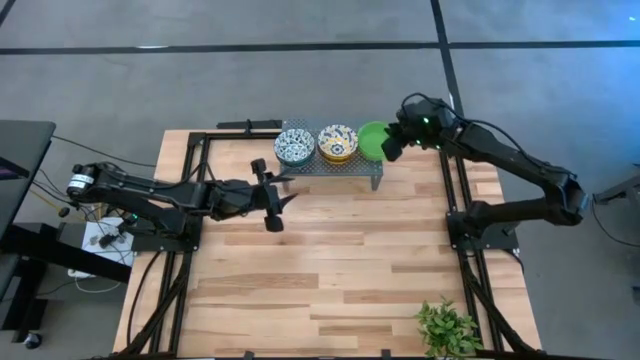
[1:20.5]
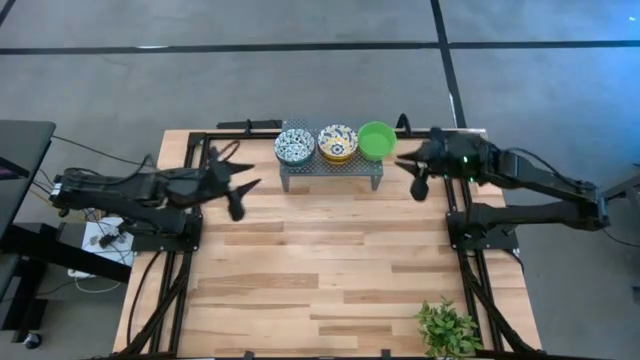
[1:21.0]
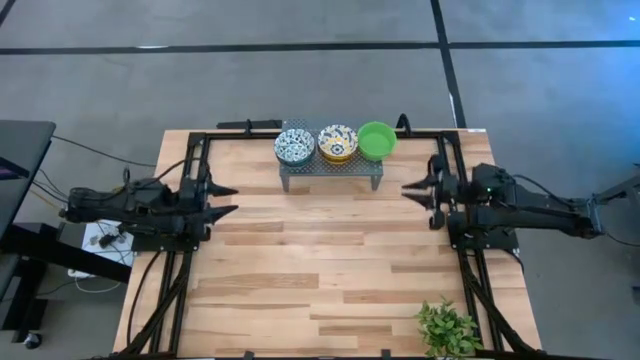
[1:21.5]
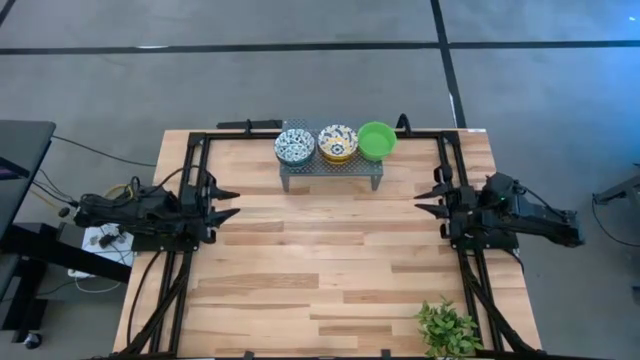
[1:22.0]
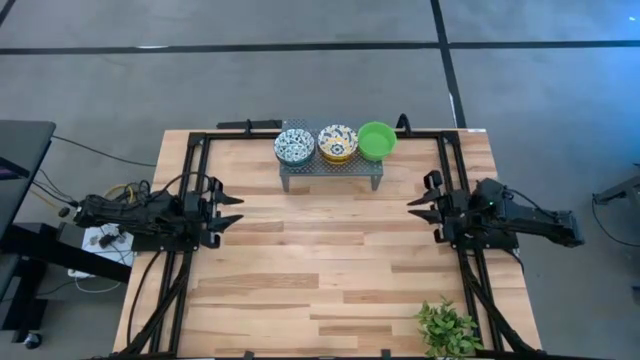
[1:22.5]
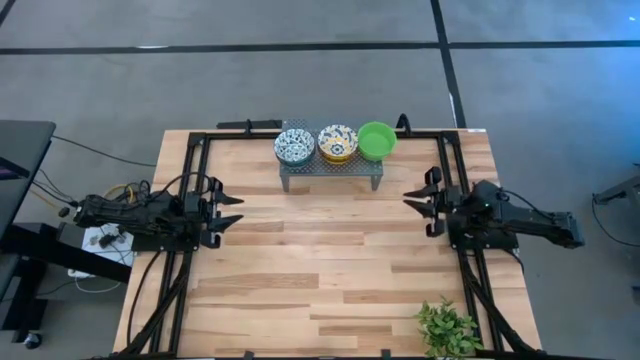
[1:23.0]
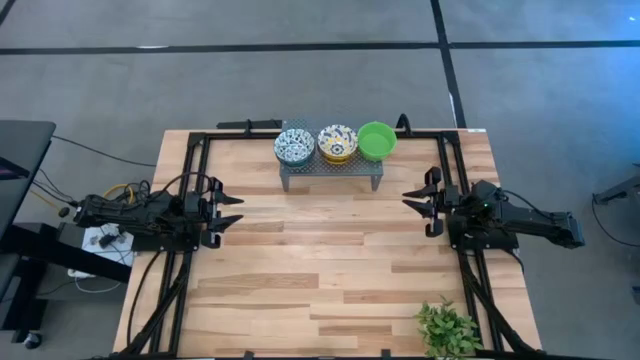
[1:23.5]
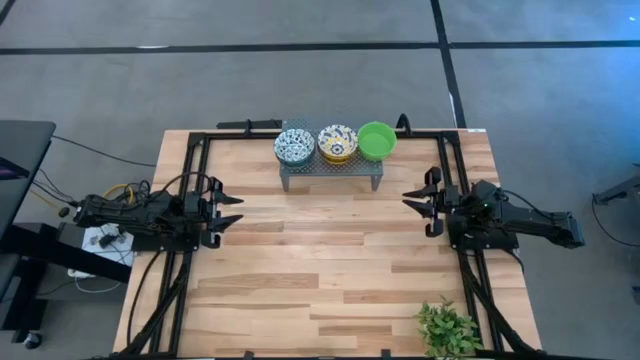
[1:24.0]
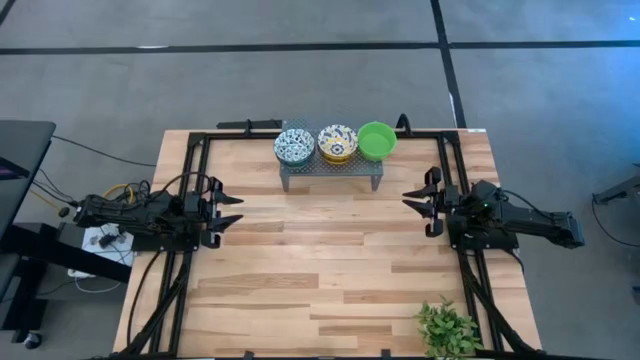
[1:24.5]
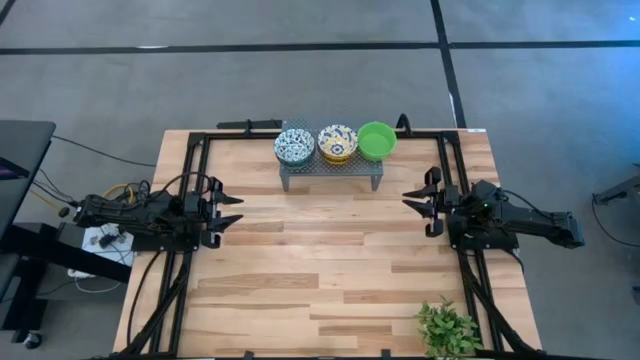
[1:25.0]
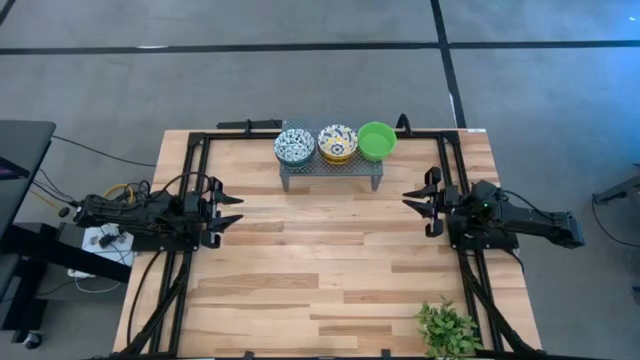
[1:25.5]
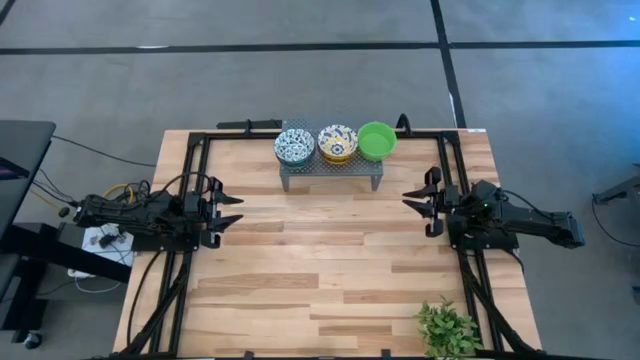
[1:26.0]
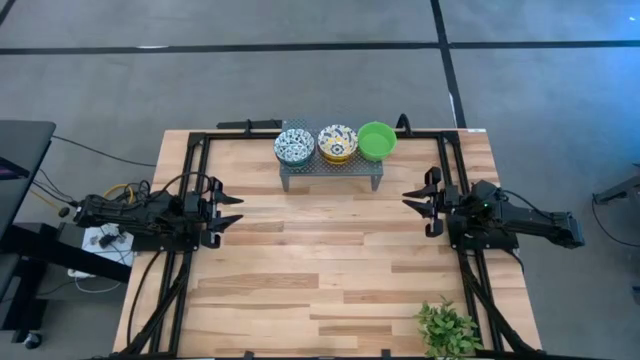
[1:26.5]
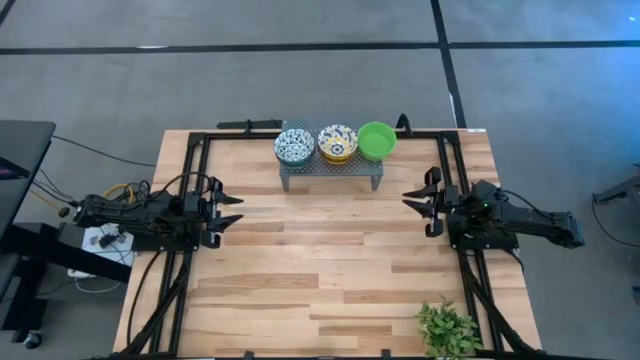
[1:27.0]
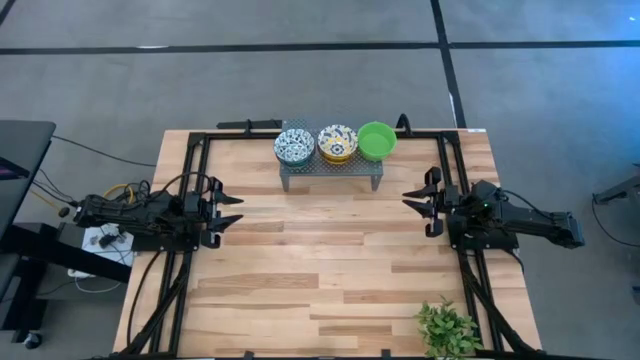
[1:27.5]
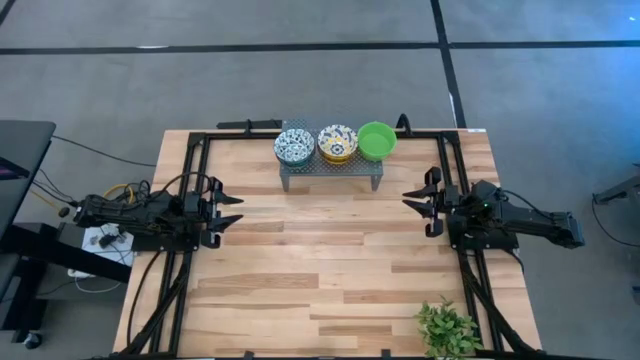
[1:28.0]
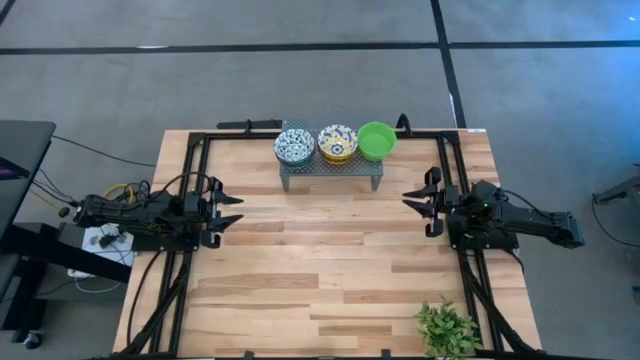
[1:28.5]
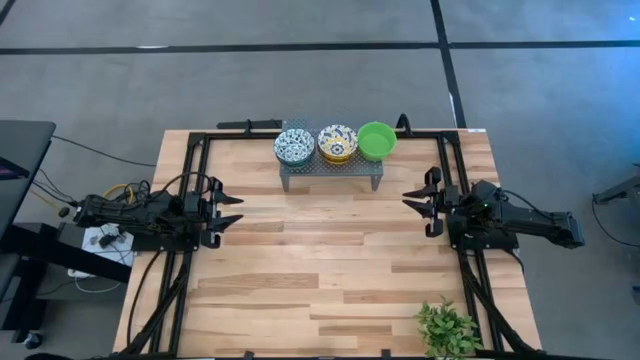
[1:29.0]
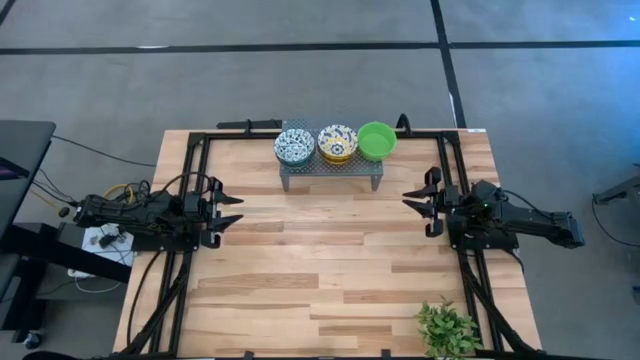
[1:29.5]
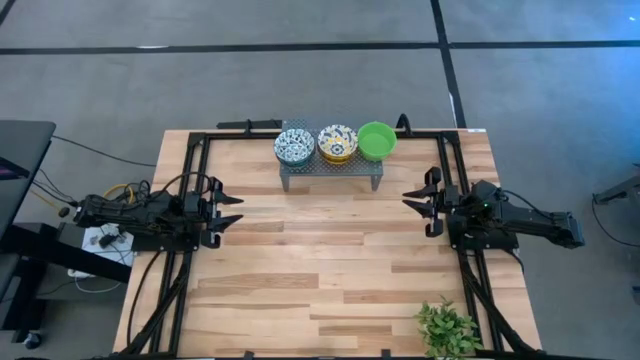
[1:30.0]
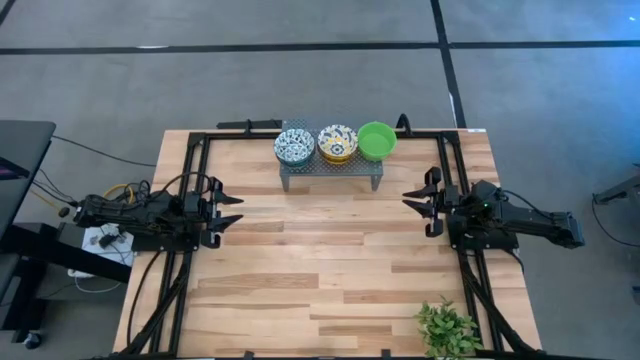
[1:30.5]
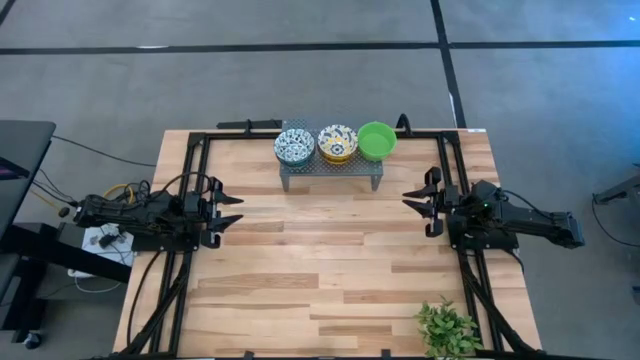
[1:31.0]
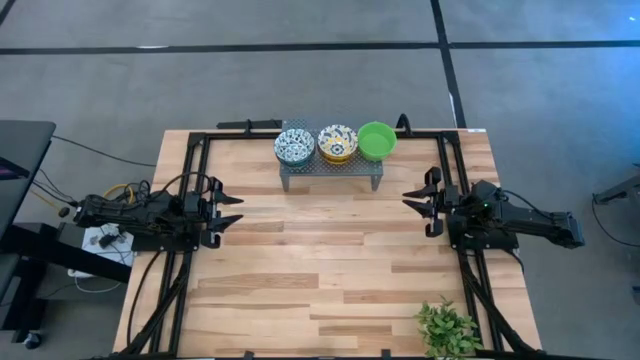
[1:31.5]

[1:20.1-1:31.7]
Task: Pick & Place Mini bowls
Return to Home Position

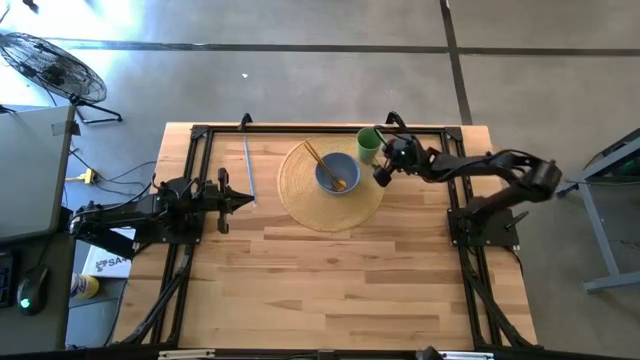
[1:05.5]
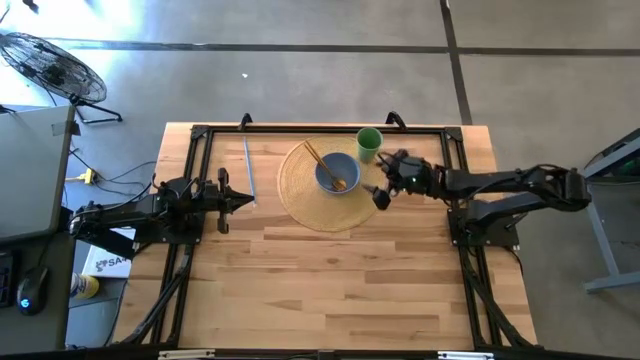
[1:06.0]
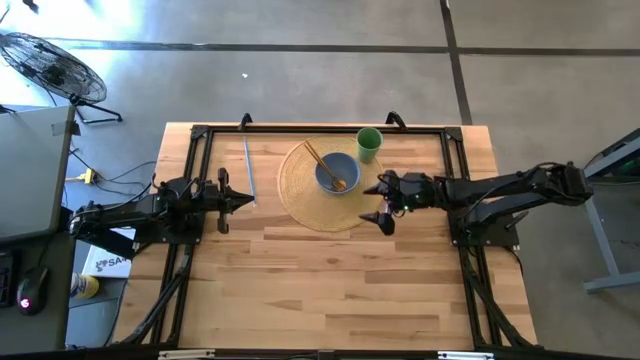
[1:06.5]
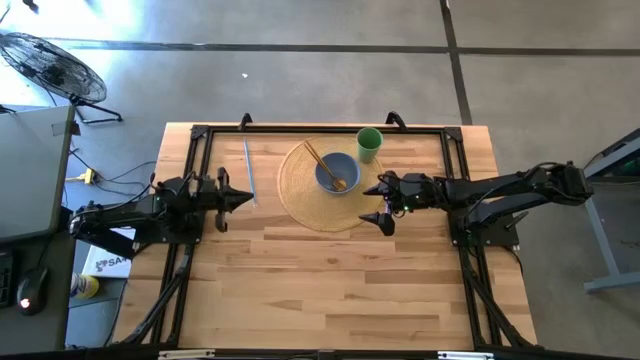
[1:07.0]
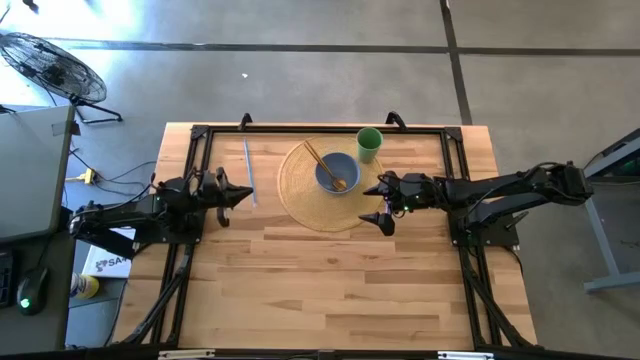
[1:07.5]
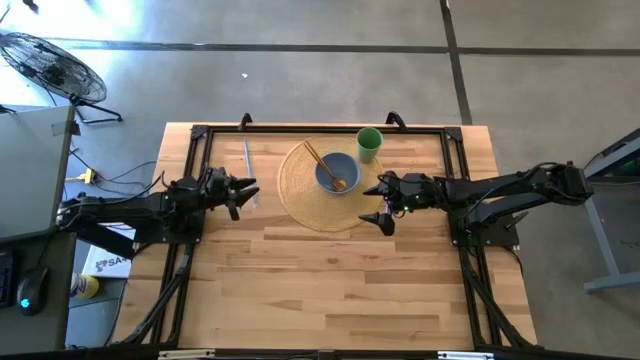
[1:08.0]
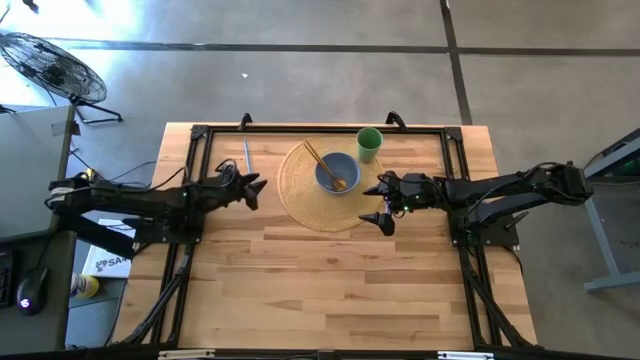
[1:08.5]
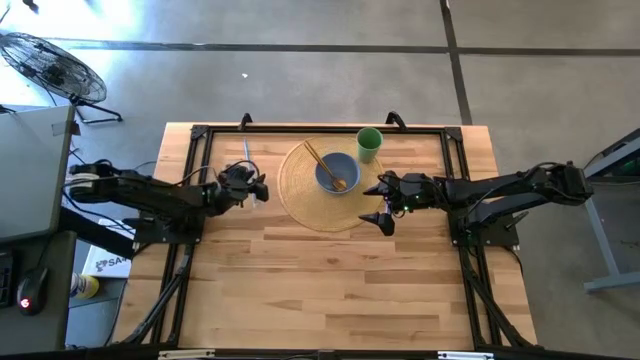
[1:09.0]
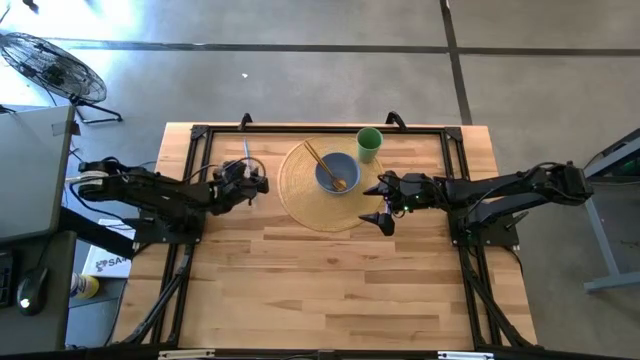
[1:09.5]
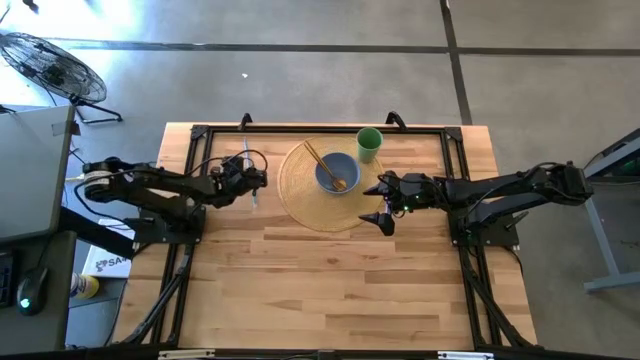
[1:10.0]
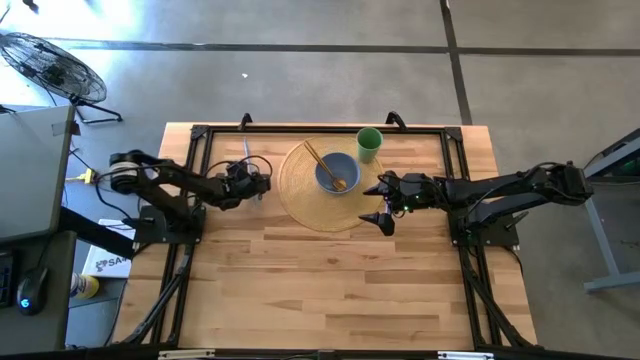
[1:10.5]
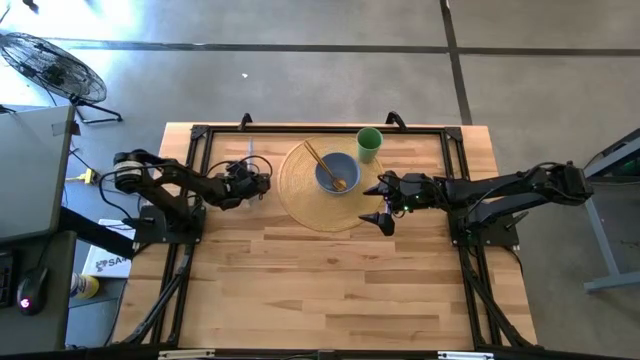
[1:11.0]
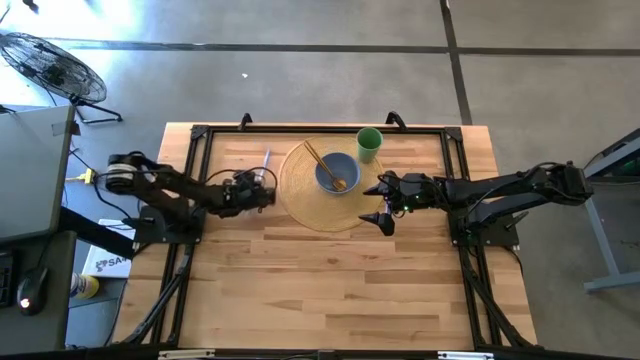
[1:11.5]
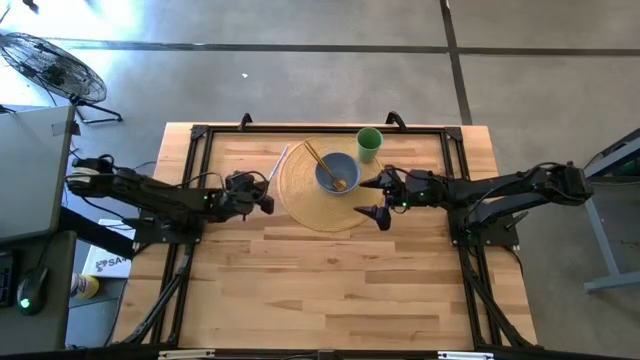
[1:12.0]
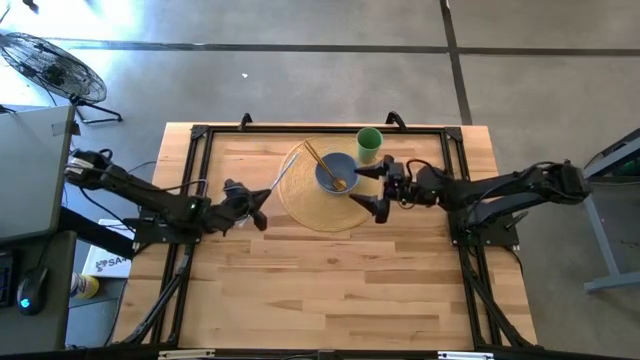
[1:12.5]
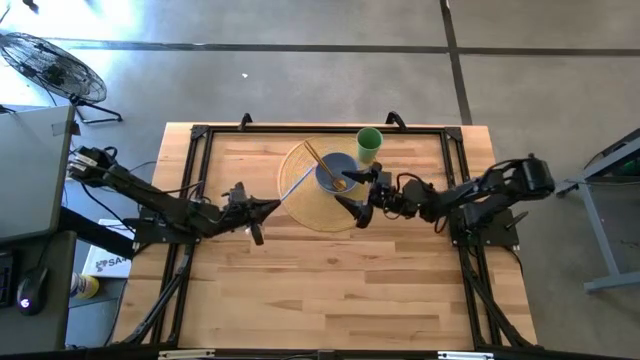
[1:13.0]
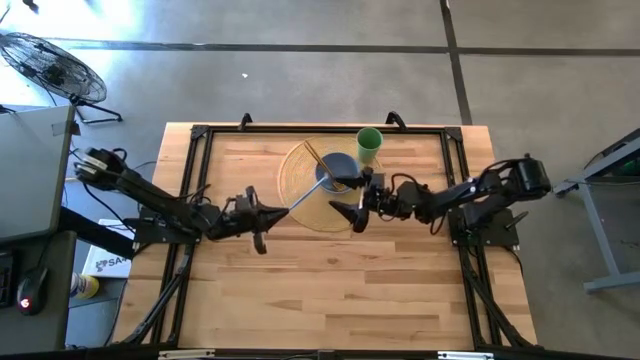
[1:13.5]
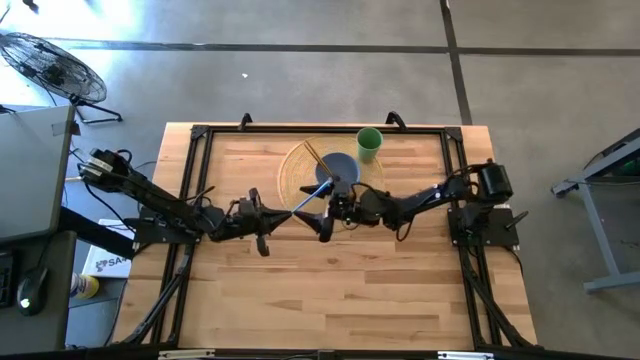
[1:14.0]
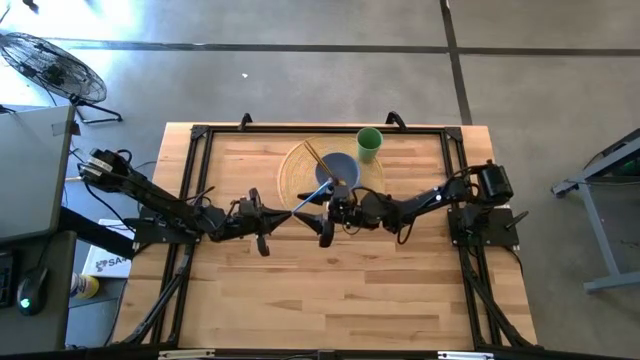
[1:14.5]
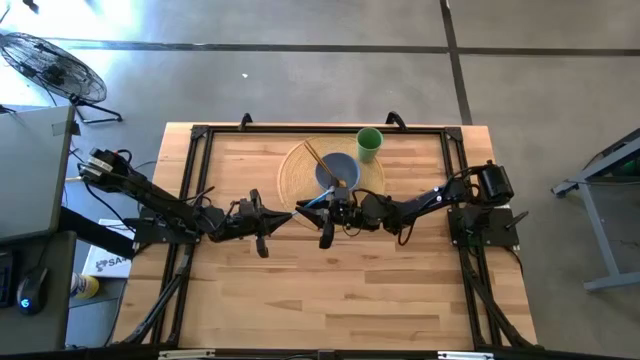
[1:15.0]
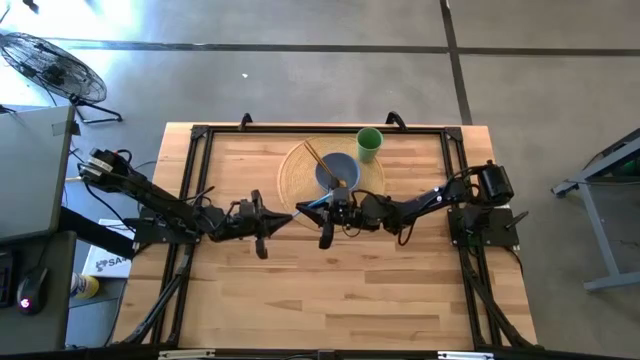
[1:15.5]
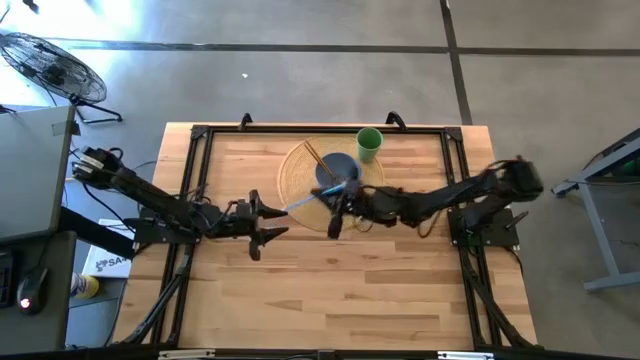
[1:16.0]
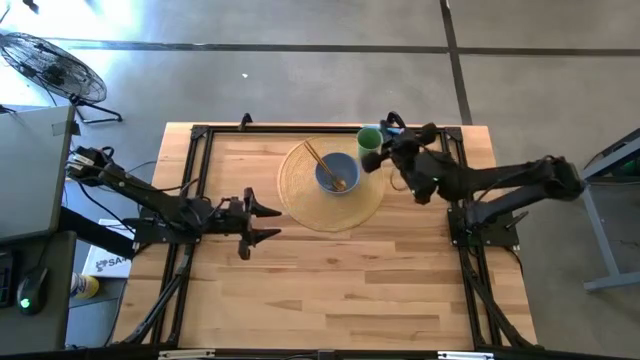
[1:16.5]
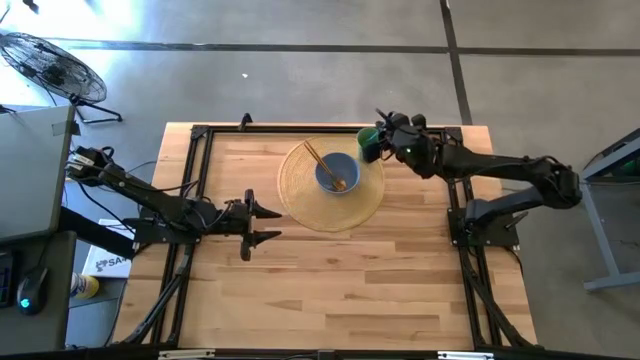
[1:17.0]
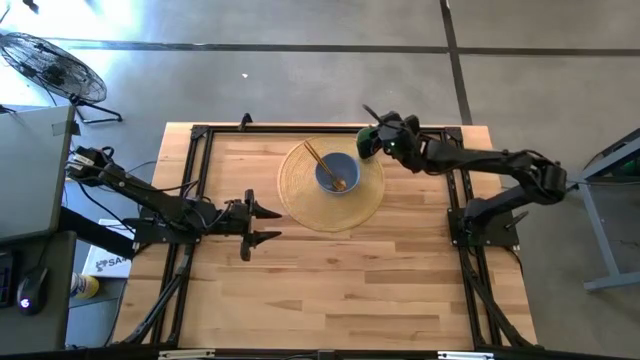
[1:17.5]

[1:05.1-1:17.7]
Task: Pick & Place Utensil
Put the blue straw into the green cup on the brown mat
